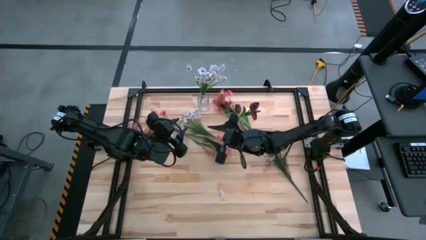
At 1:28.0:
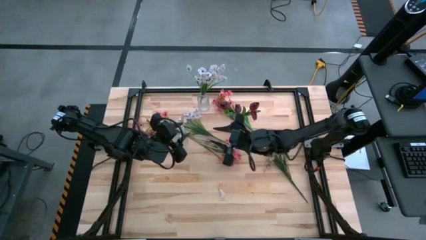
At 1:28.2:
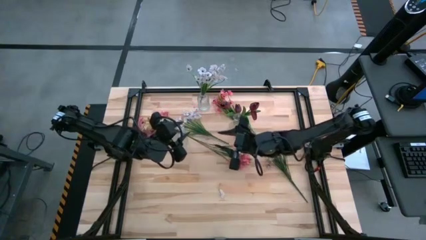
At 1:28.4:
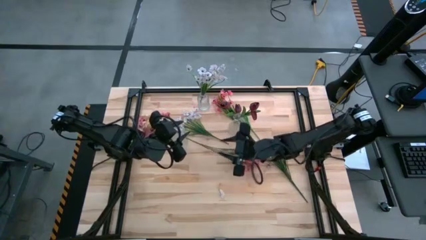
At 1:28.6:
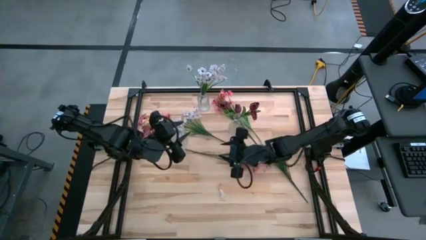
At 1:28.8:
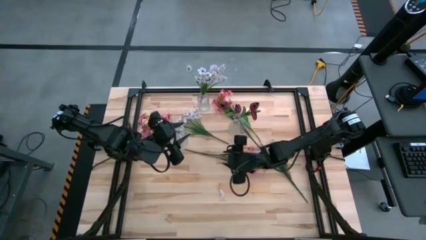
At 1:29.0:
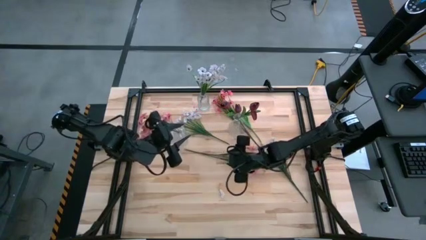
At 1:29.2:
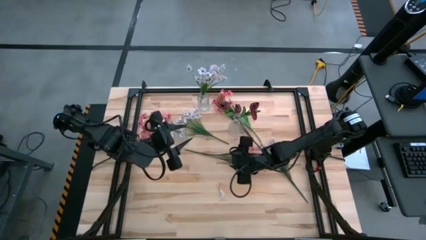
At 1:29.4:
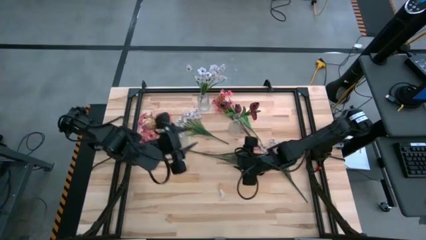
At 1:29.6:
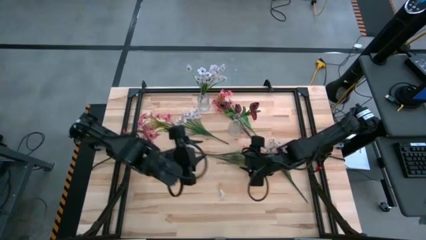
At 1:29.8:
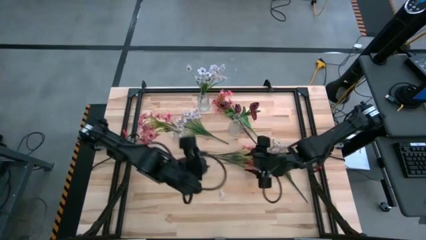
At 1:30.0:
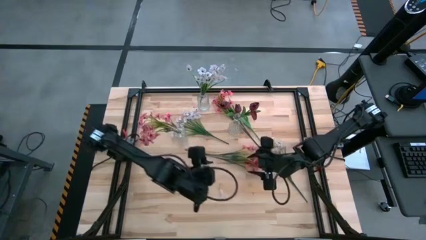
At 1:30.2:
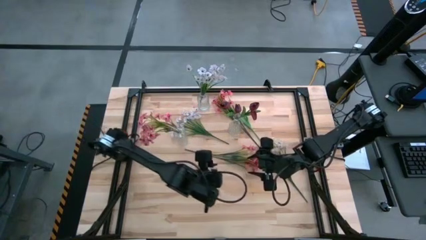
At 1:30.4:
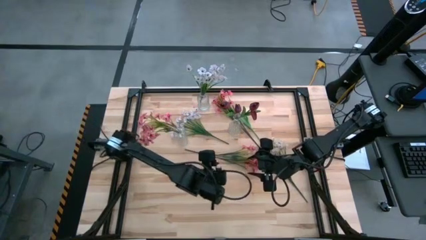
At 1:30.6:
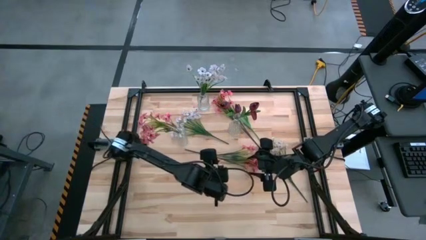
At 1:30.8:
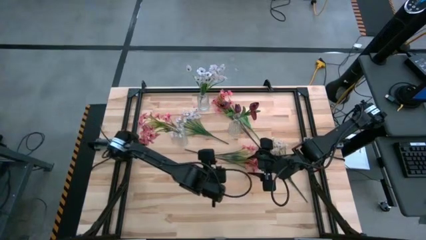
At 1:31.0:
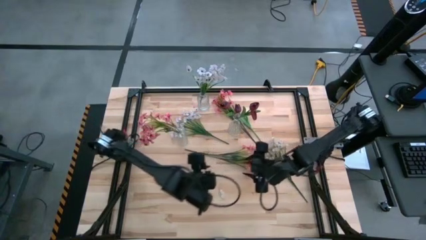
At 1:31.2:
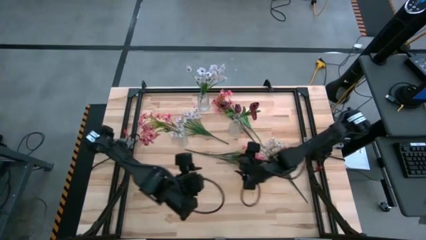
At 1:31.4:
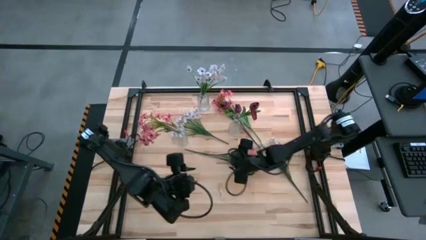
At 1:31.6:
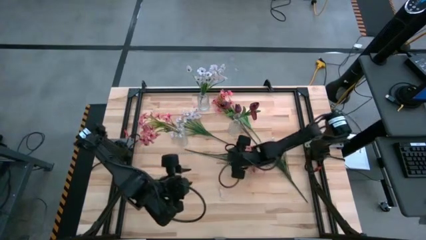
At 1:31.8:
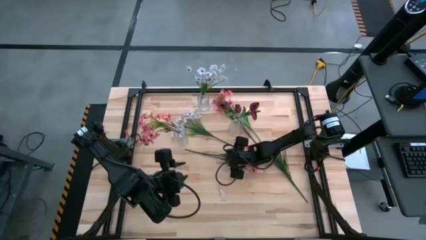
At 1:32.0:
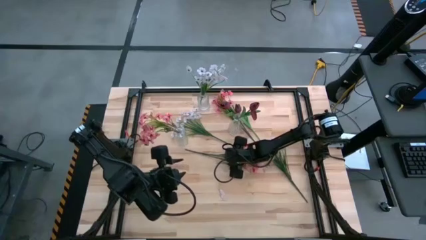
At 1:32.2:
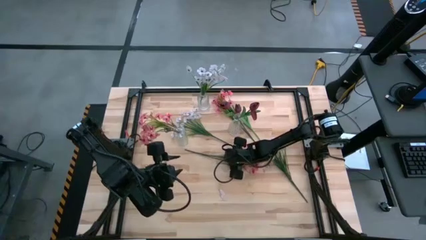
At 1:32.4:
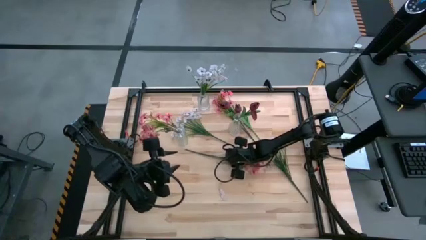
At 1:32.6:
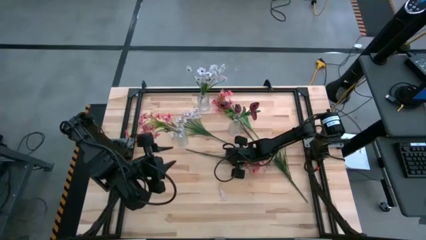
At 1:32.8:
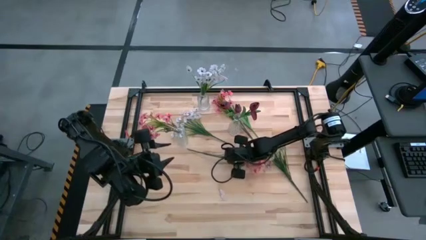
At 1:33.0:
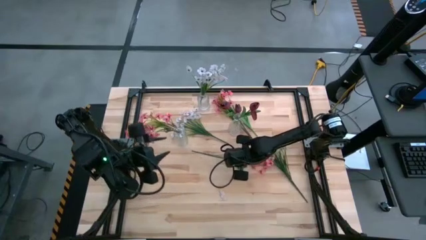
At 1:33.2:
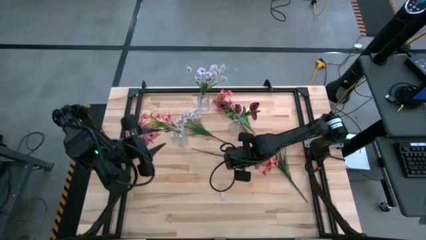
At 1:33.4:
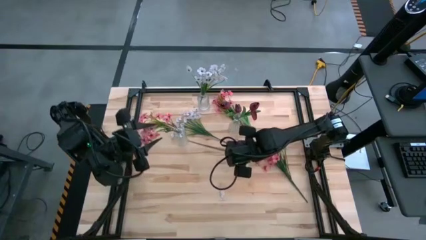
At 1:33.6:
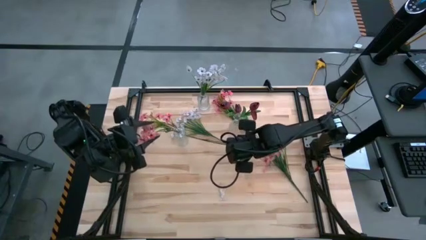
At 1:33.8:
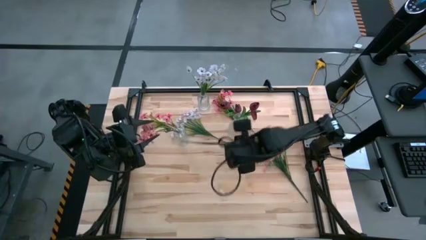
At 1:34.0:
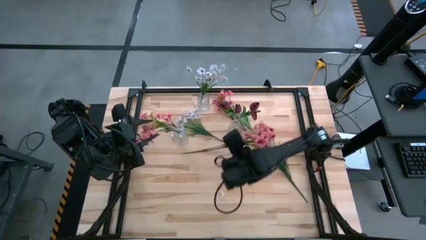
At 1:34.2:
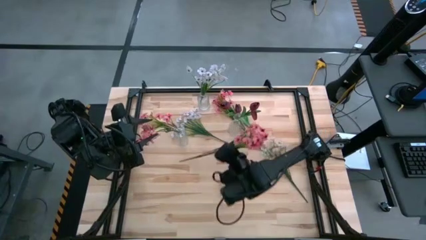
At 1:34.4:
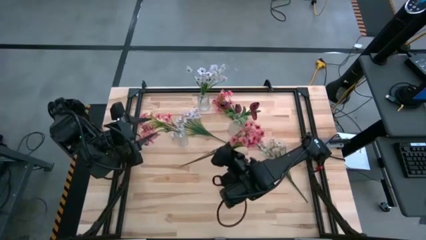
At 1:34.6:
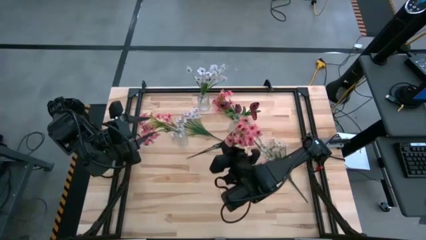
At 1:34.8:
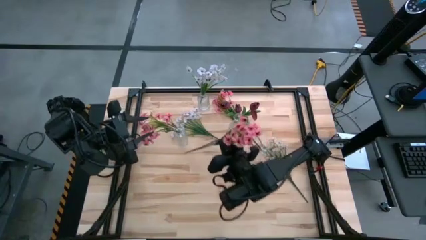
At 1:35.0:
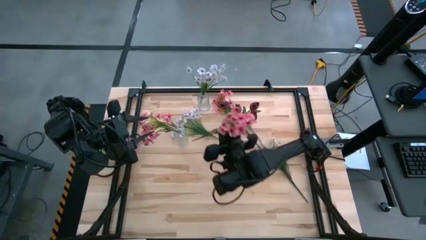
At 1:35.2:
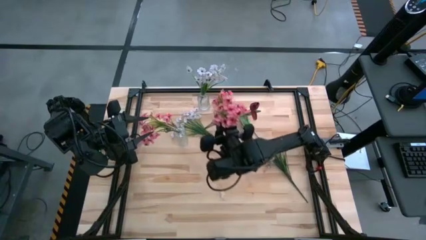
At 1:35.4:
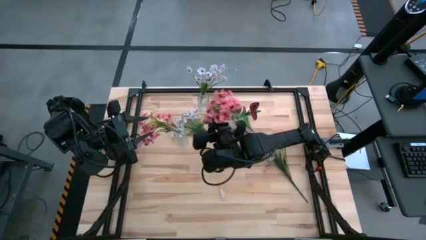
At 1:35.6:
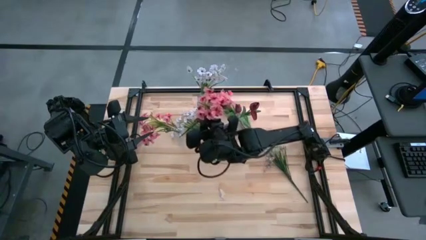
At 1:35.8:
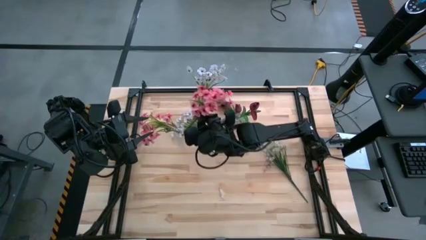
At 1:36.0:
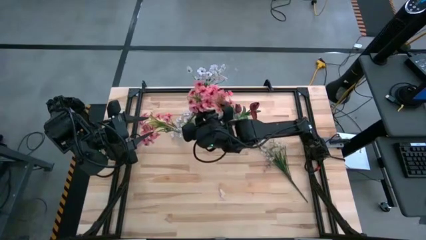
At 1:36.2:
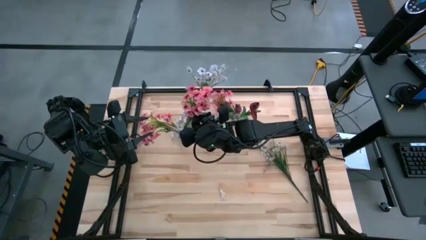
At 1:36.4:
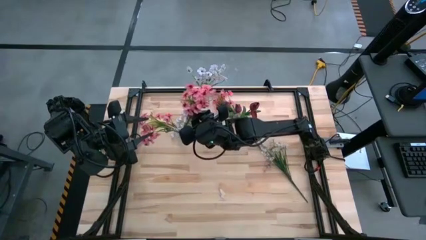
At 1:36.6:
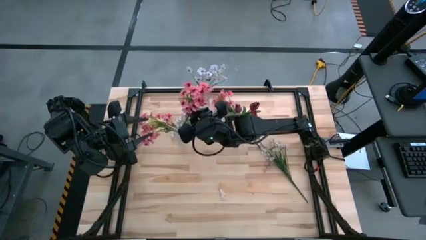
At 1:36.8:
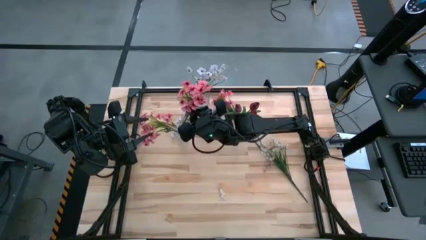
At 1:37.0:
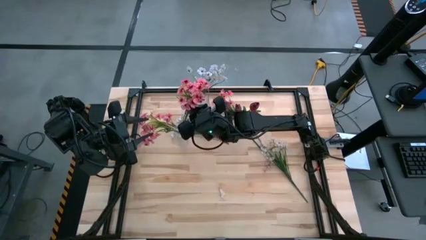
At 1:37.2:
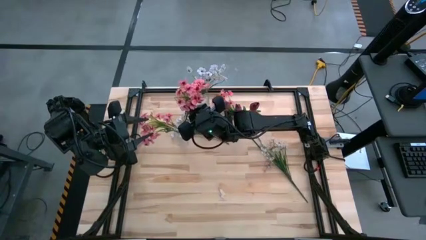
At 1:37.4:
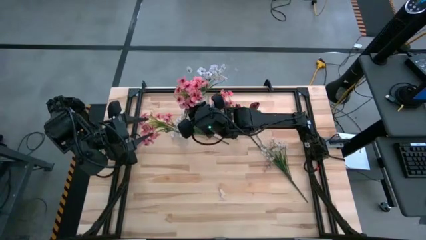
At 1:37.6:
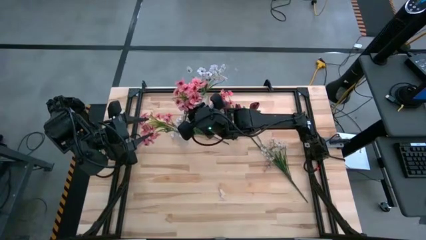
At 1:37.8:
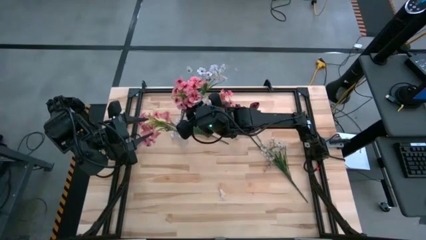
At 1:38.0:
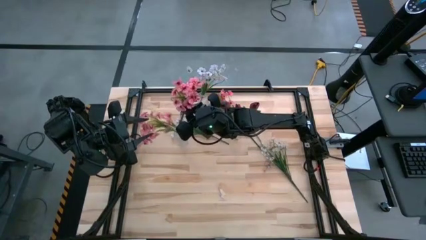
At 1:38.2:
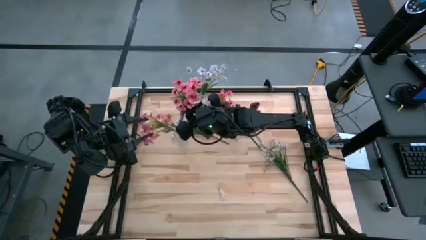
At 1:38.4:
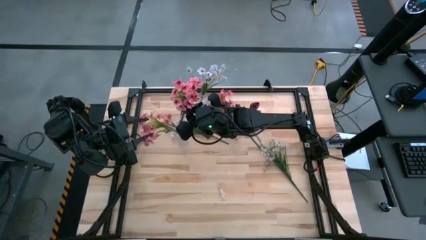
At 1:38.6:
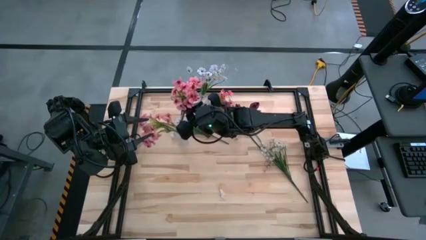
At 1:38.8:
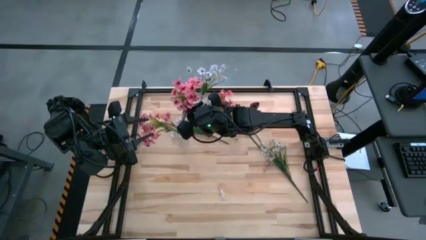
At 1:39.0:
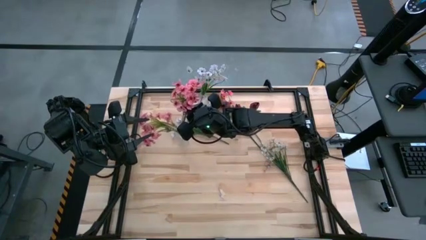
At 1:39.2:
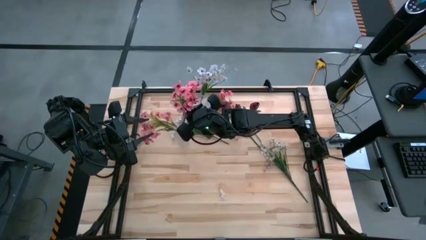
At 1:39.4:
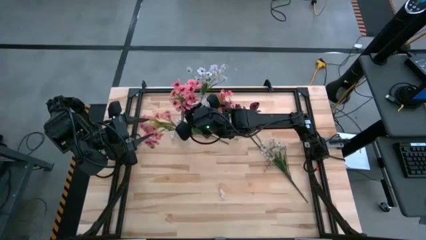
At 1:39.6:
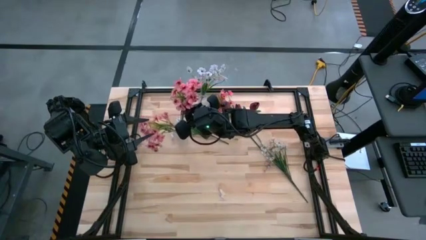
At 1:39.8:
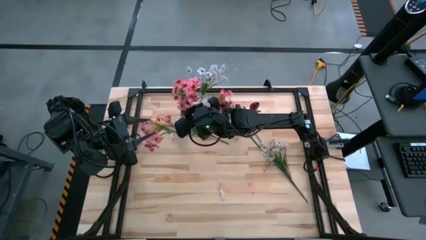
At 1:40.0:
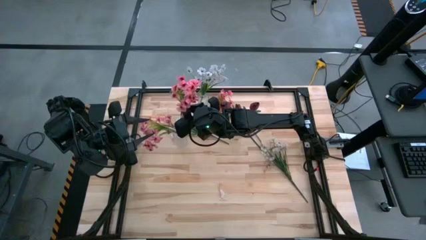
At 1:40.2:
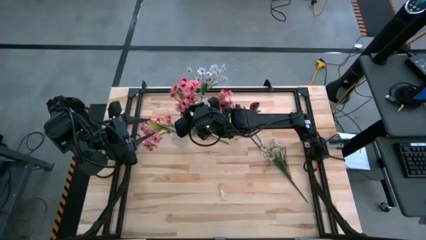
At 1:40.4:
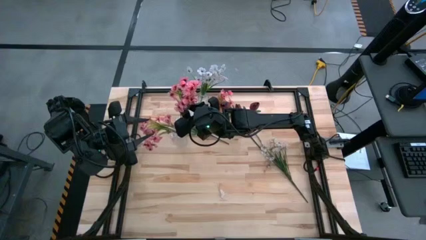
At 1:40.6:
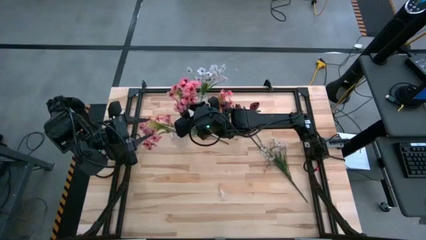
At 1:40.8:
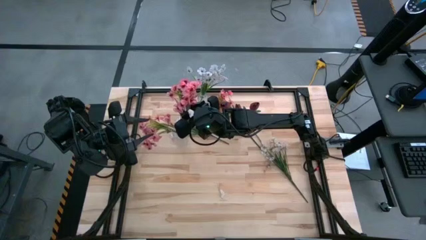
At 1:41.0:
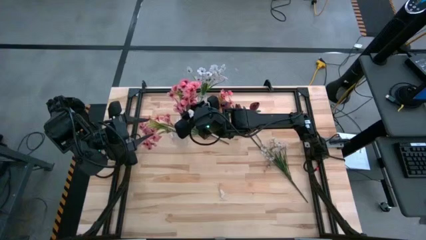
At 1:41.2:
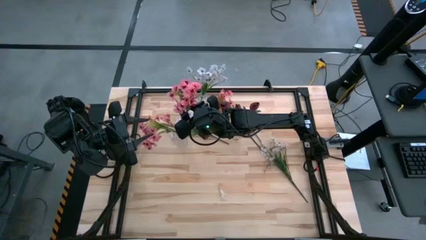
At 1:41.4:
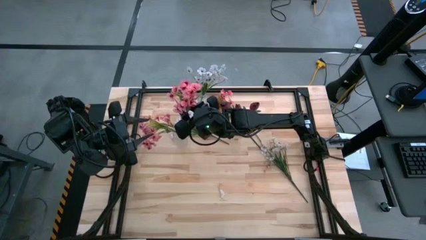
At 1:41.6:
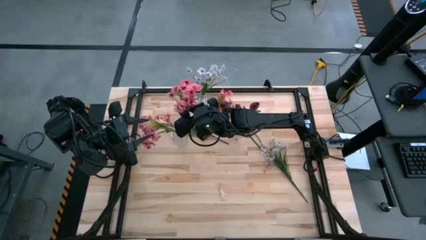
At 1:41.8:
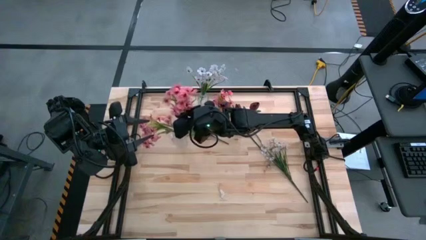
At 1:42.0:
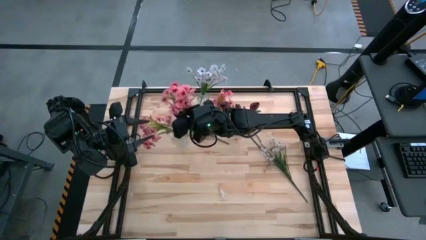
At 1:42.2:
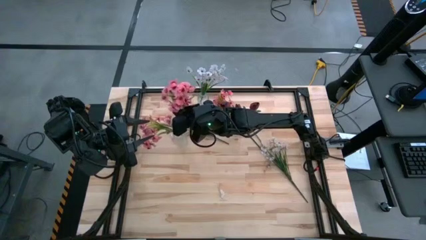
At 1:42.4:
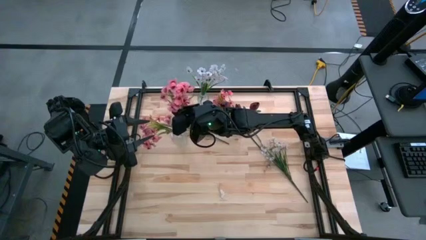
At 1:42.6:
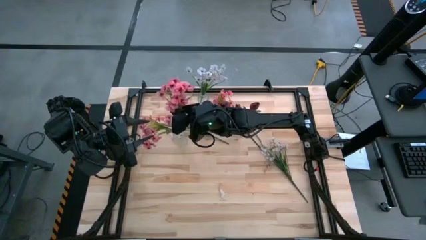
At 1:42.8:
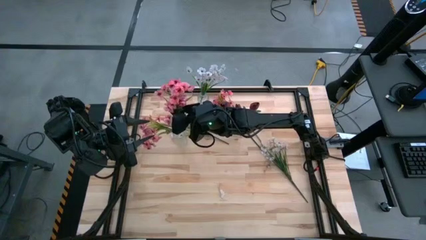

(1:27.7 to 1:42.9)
Task: Sort flowers into vase by color
Put the left pink flower into the bottom left transparent vase
